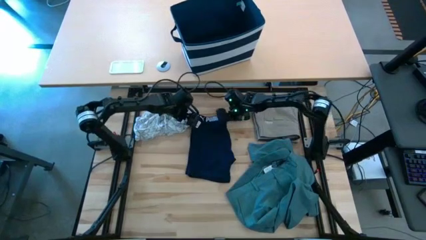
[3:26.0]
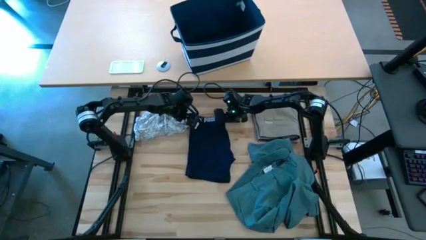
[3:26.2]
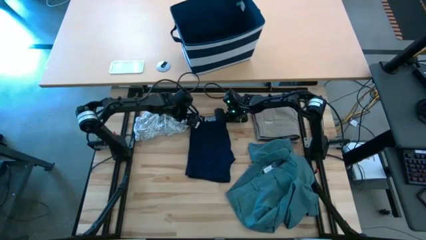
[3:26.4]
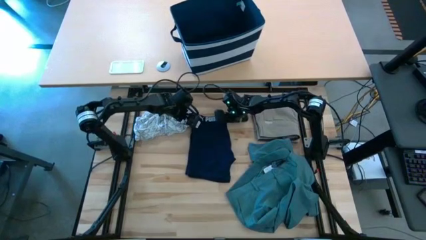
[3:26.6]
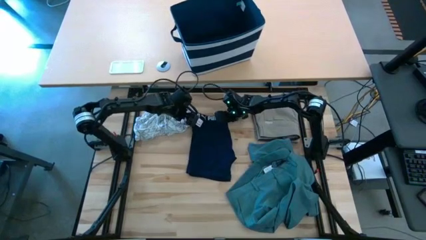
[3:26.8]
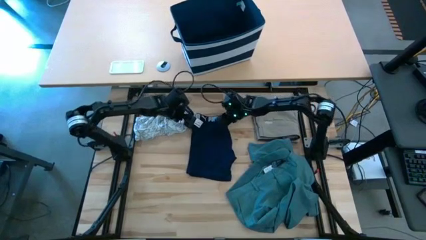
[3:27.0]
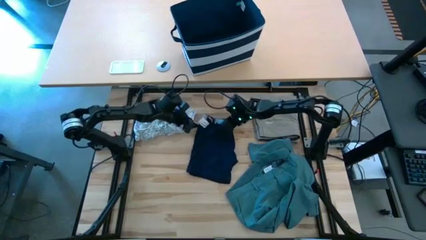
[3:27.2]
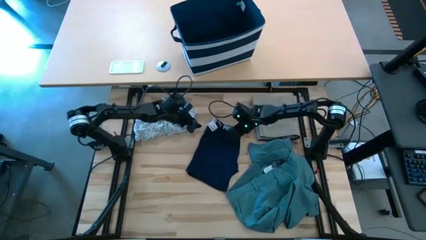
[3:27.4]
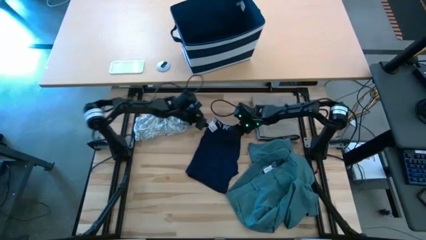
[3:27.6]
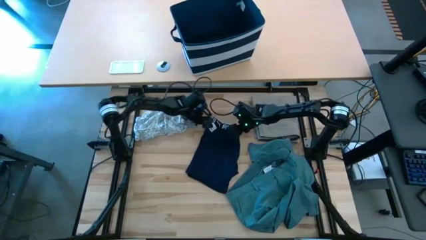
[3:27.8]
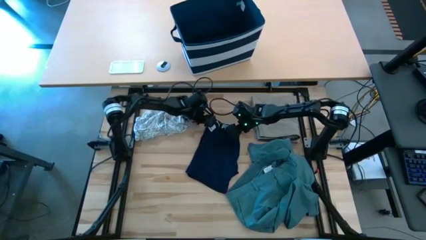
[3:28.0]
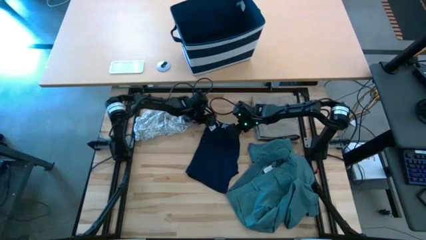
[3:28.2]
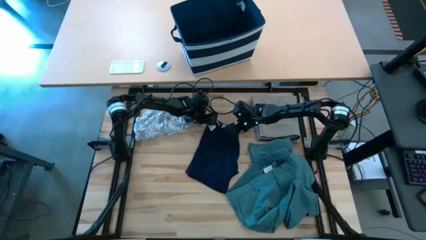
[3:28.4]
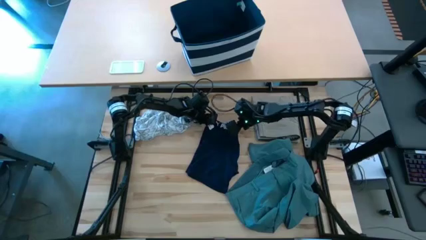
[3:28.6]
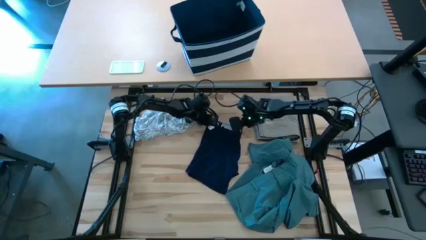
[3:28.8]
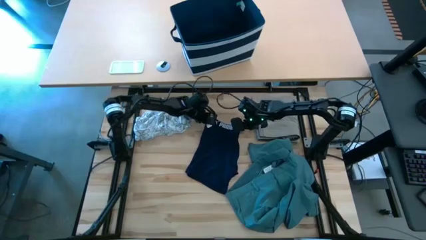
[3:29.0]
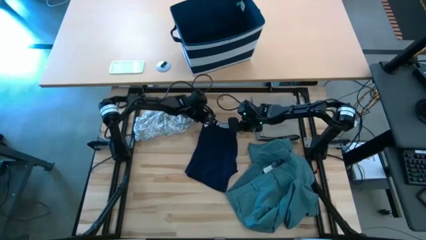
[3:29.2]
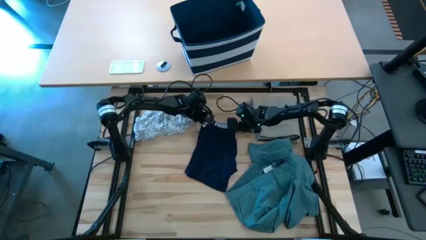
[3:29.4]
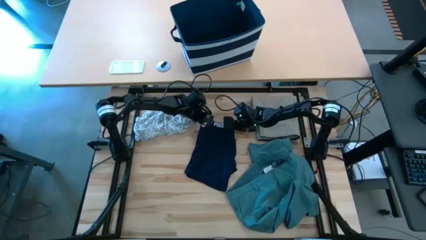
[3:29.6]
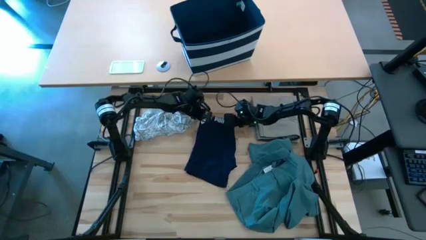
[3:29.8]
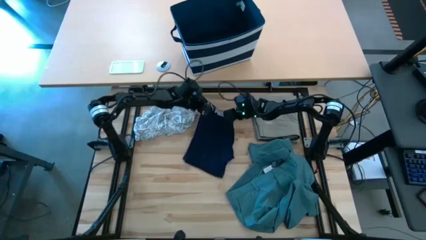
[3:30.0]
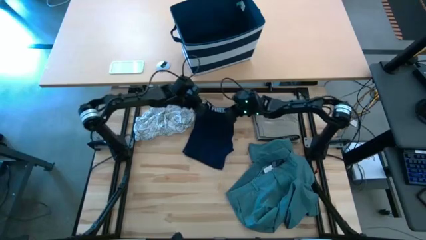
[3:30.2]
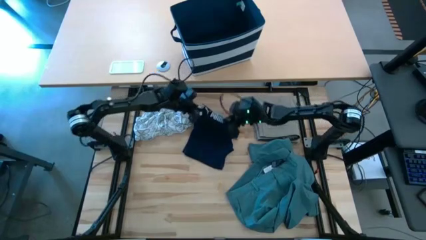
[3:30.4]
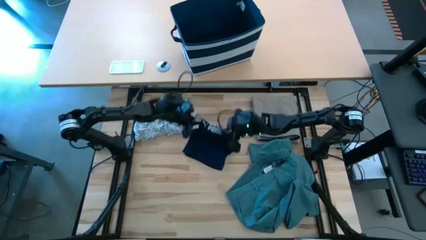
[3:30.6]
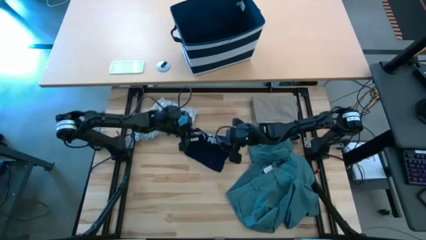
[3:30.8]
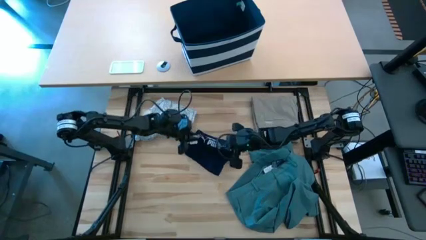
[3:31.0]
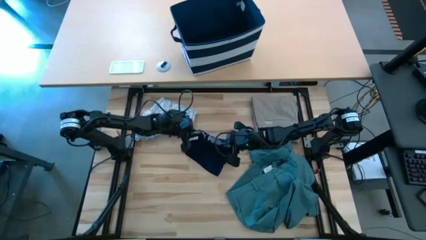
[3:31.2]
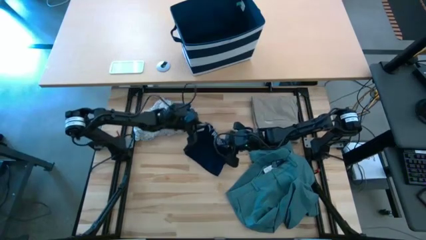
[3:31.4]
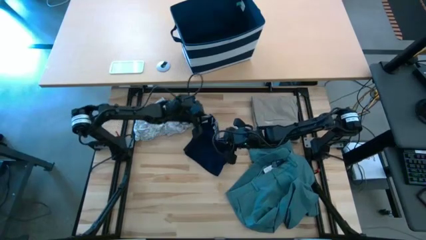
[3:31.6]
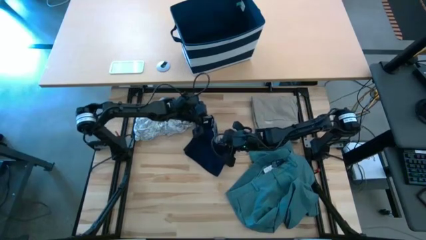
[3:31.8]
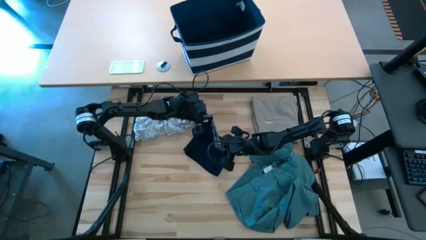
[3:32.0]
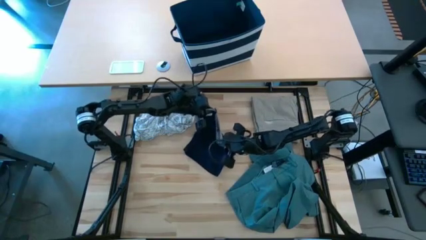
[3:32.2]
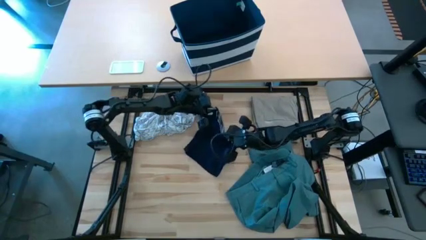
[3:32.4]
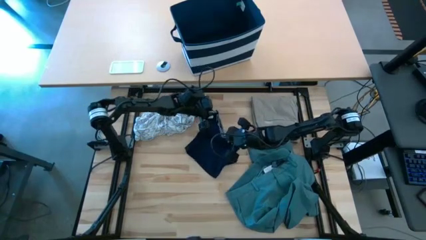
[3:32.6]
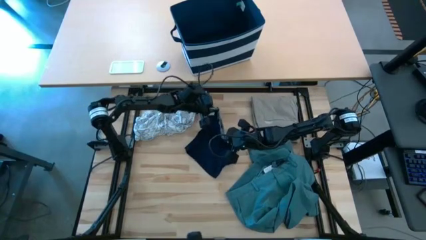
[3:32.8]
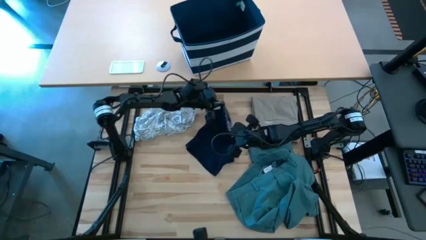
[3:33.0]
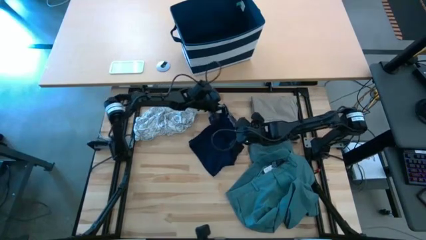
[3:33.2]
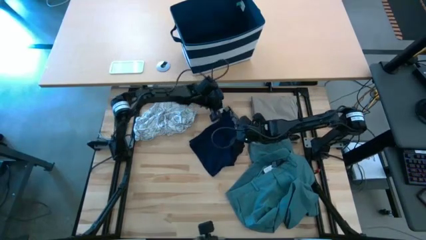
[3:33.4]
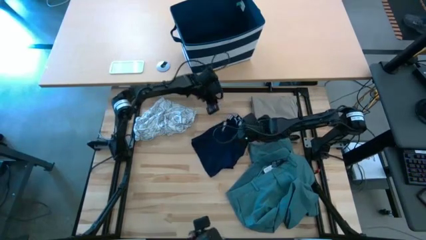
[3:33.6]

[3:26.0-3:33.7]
Task: Fold Laundry from Bin
Fold the blue boxer

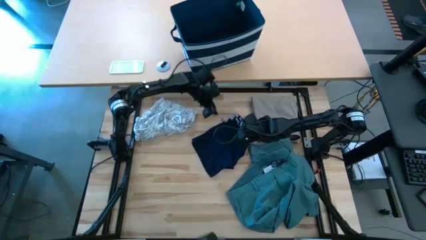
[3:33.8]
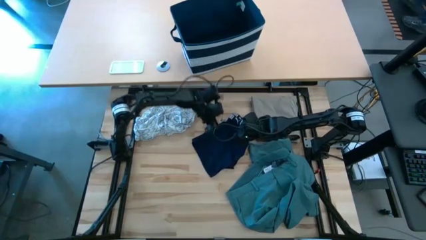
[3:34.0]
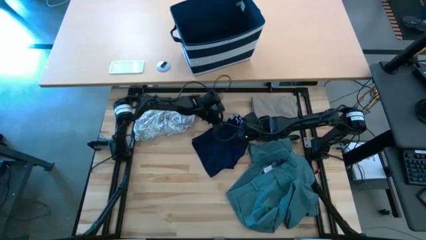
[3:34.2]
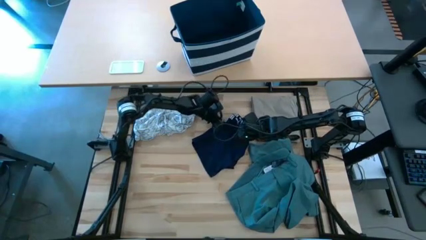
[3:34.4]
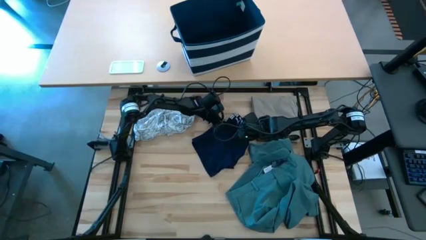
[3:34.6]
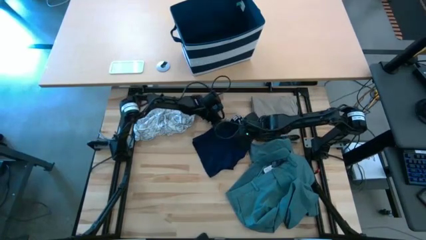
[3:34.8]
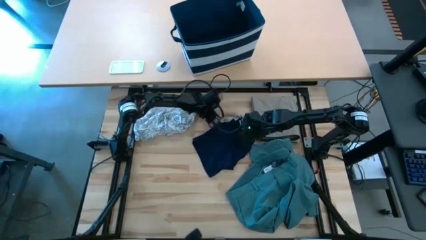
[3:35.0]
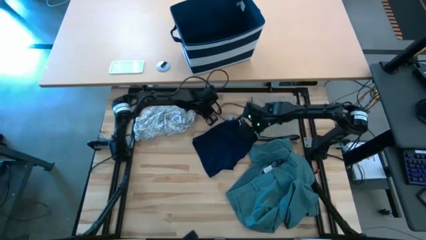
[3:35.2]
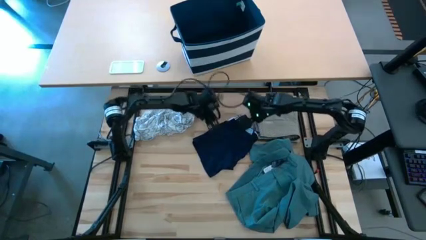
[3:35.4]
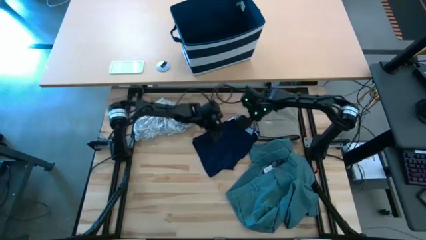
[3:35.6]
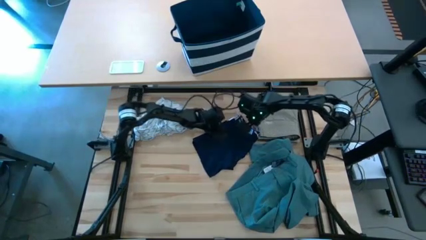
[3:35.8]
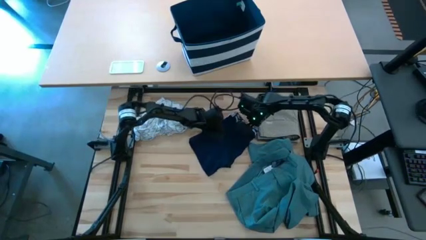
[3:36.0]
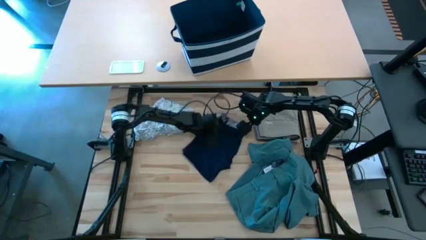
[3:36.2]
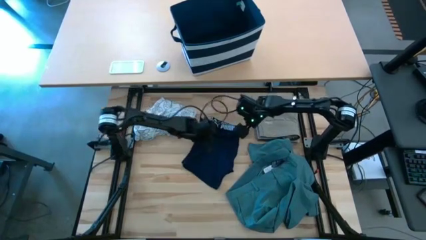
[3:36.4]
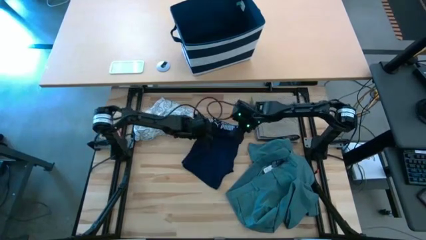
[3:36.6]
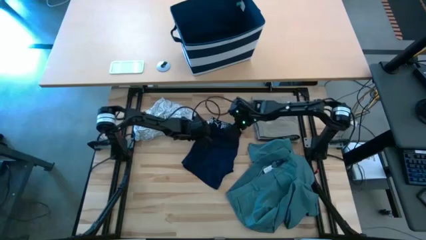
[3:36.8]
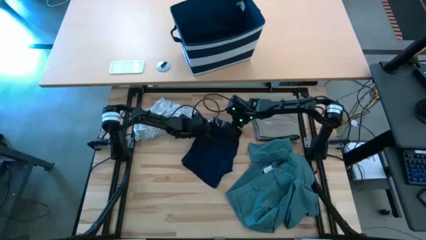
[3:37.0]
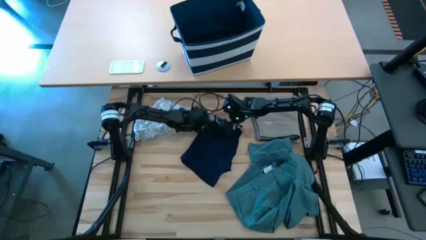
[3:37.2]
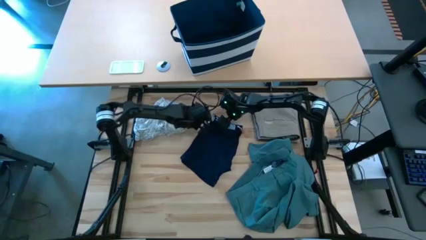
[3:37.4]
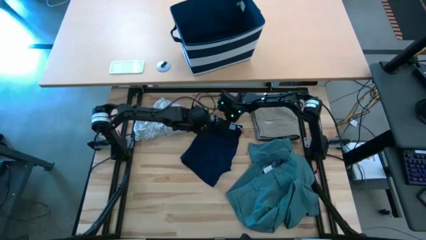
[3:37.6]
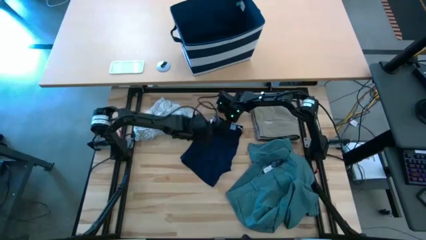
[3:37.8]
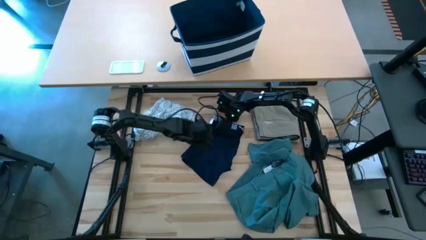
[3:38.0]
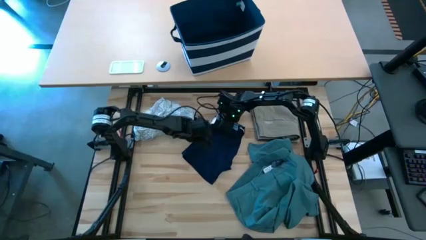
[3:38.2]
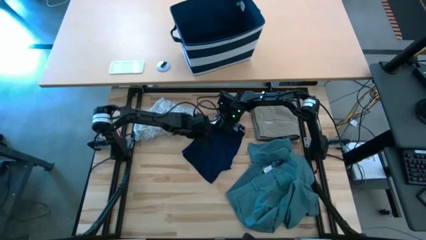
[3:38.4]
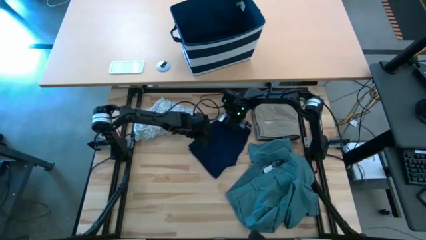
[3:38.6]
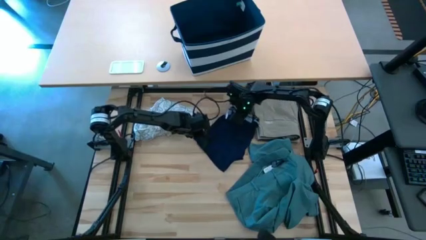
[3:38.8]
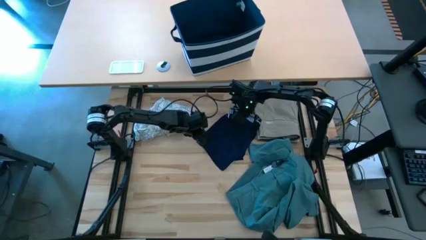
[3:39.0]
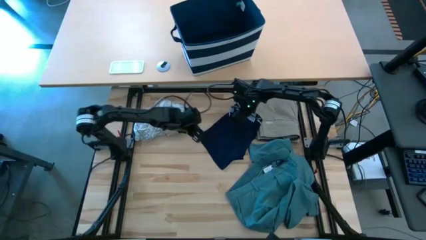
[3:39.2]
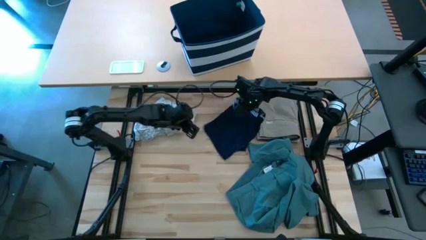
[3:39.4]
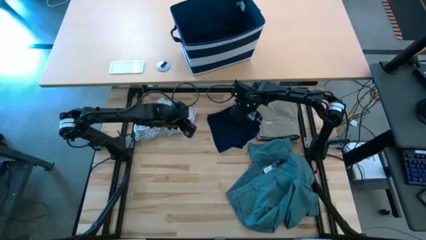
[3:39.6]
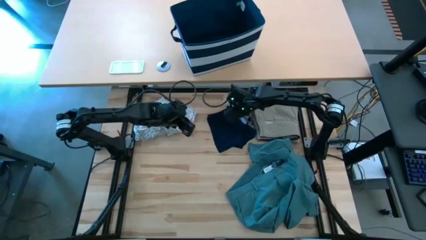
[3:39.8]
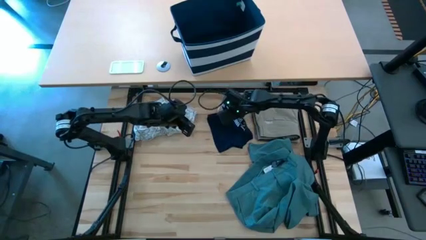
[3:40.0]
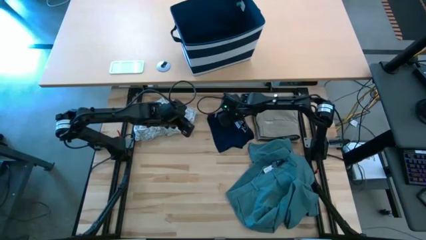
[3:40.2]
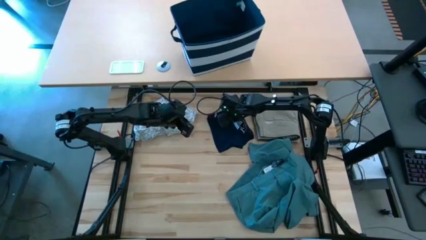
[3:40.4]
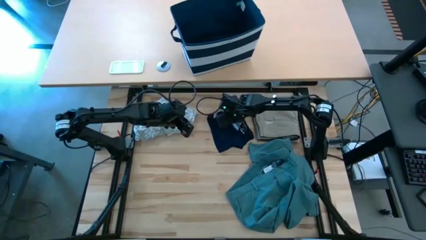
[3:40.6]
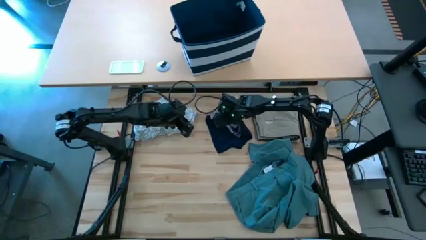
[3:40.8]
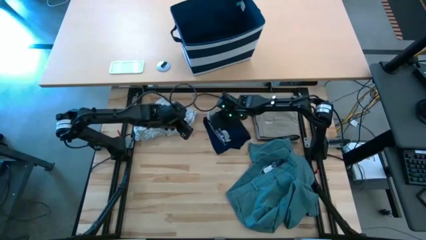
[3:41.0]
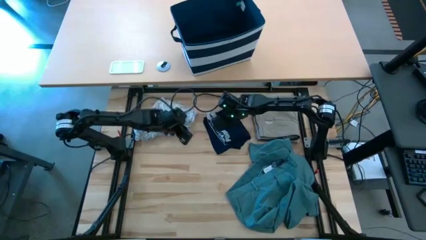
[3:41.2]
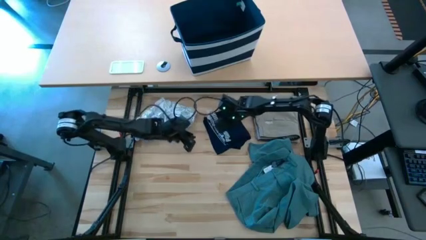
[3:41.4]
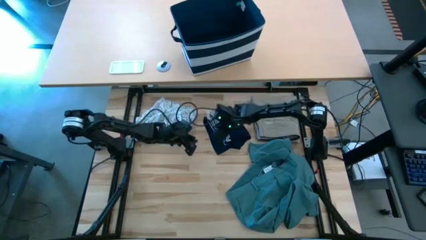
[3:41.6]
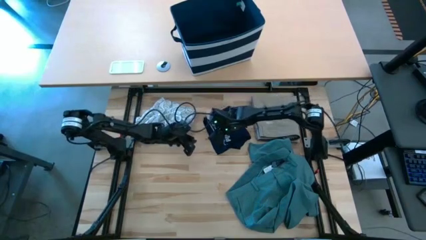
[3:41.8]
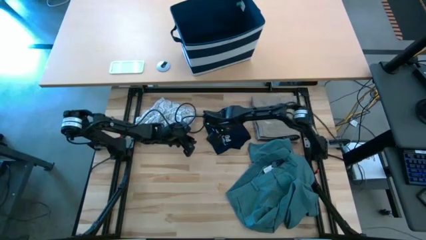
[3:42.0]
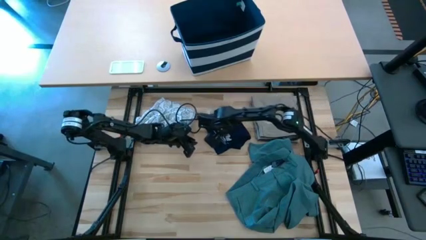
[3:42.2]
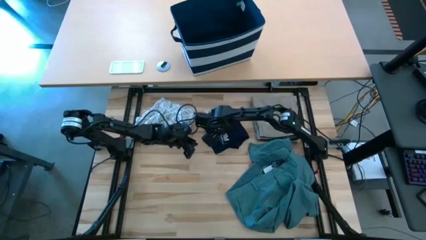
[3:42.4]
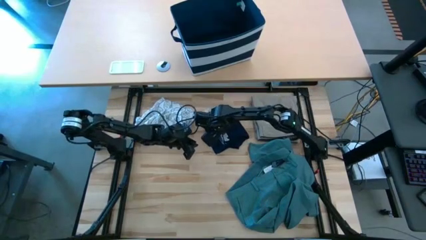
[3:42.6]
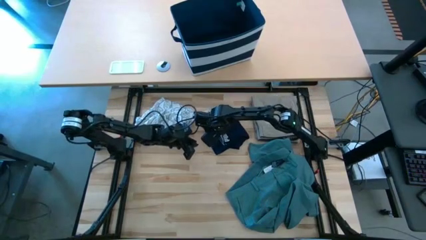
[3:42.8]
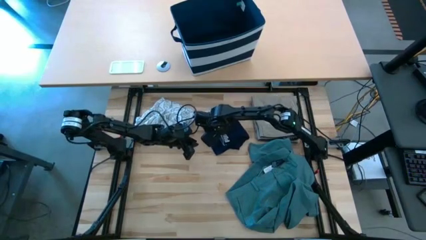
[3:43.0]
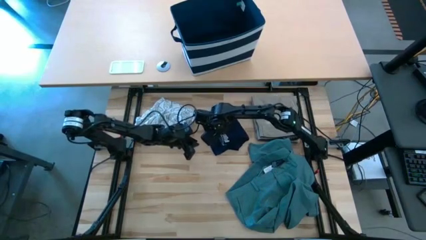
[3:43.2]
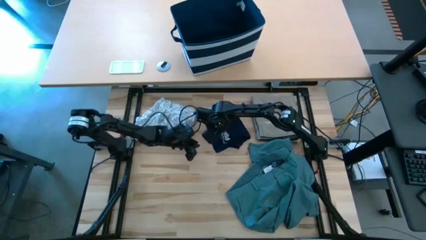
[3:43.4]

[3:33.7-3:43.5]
Fold the blue boxer
